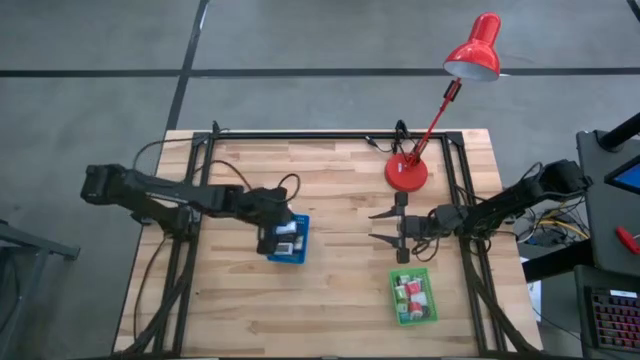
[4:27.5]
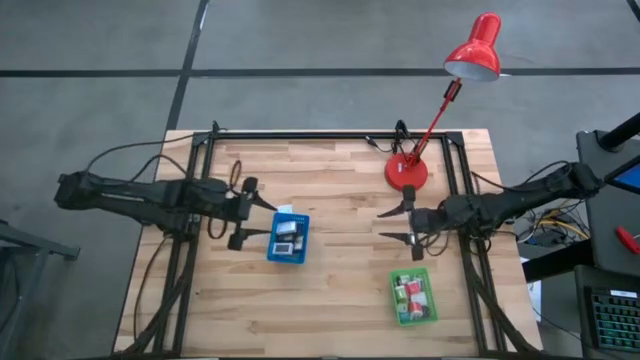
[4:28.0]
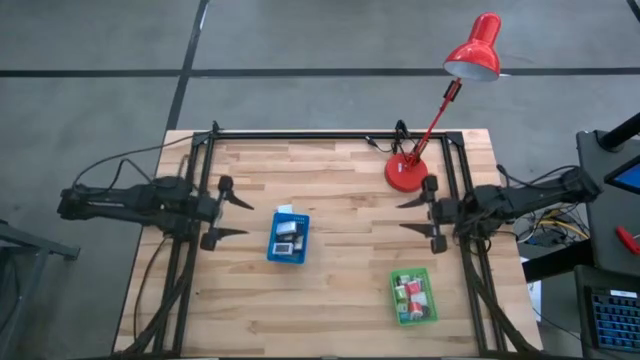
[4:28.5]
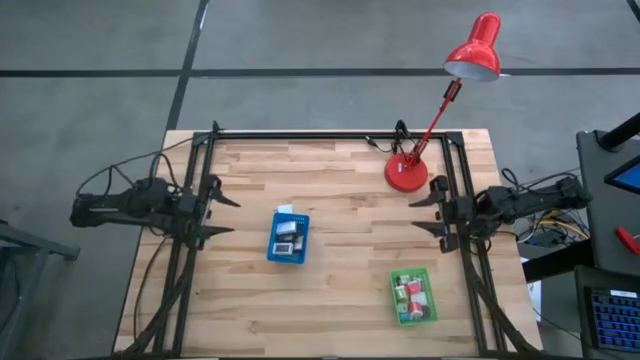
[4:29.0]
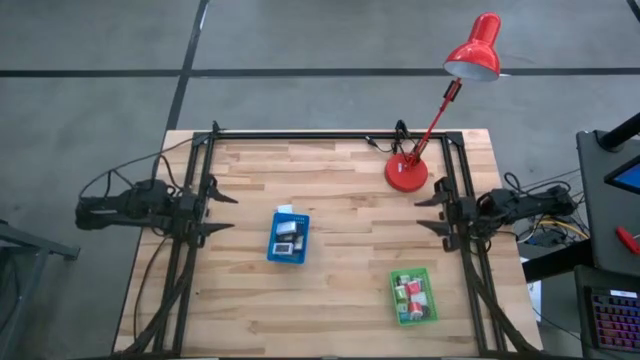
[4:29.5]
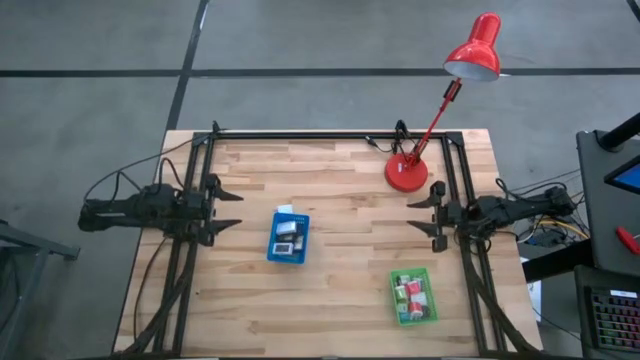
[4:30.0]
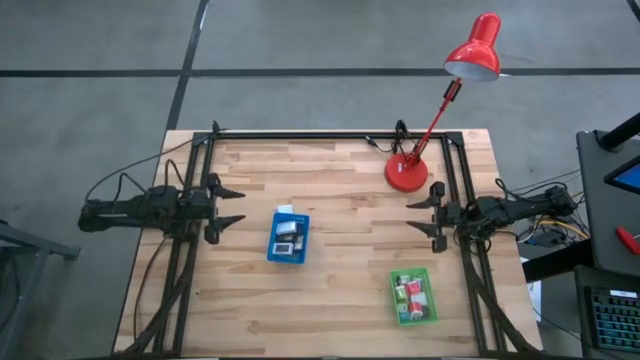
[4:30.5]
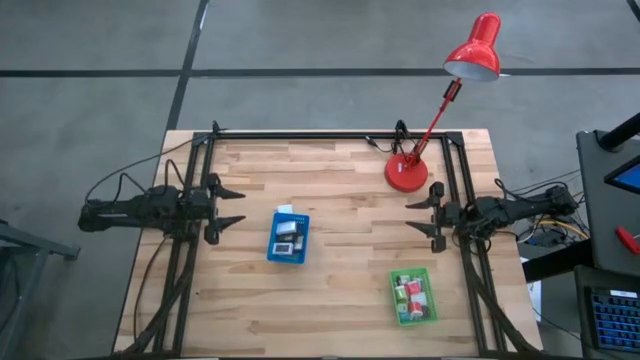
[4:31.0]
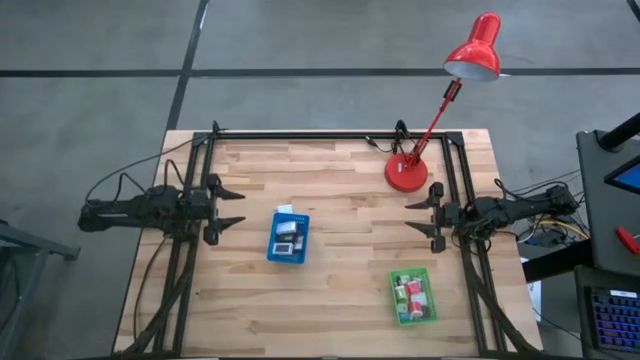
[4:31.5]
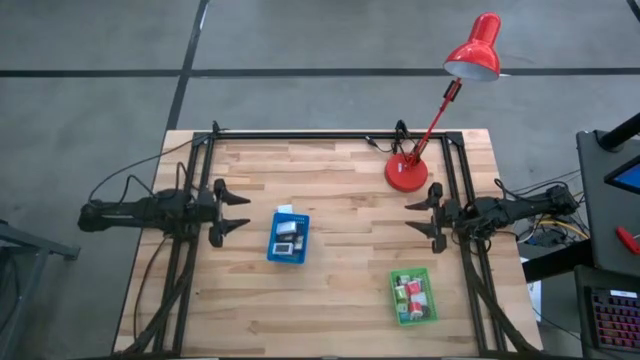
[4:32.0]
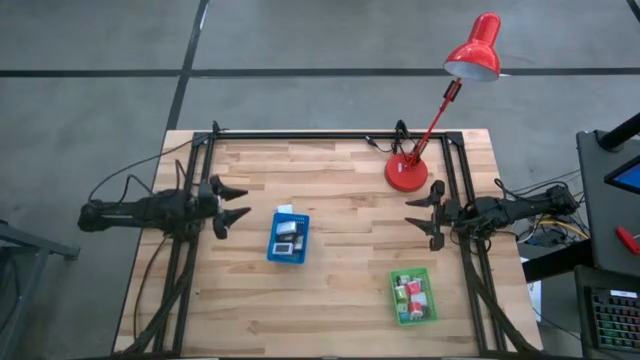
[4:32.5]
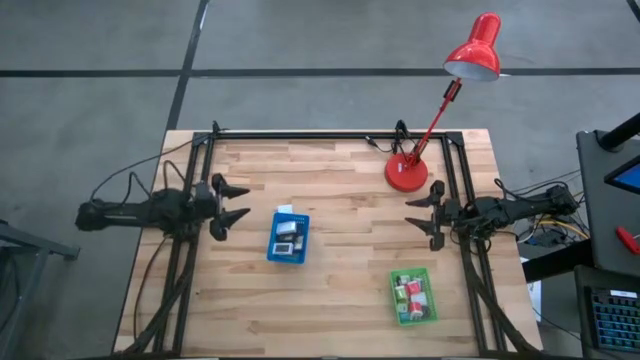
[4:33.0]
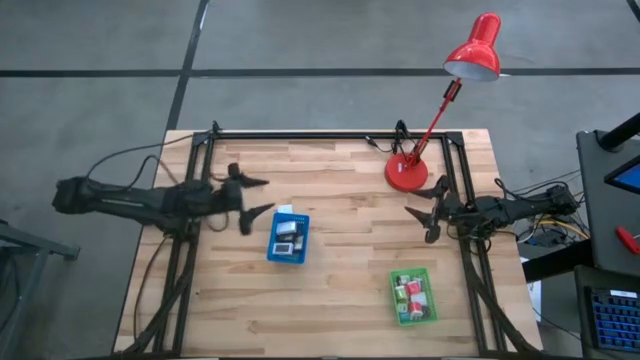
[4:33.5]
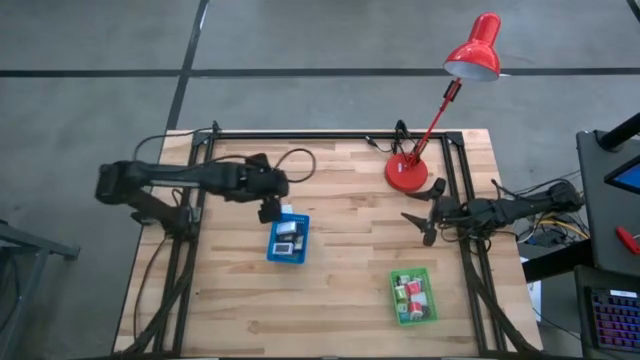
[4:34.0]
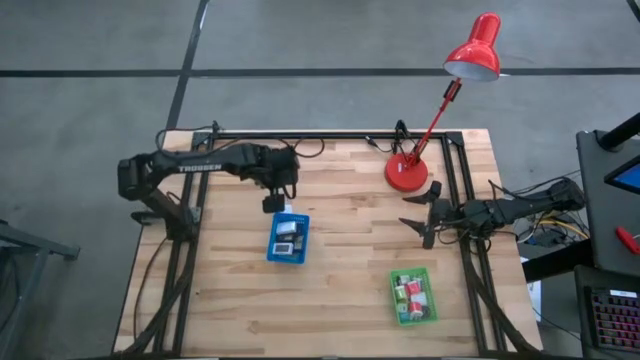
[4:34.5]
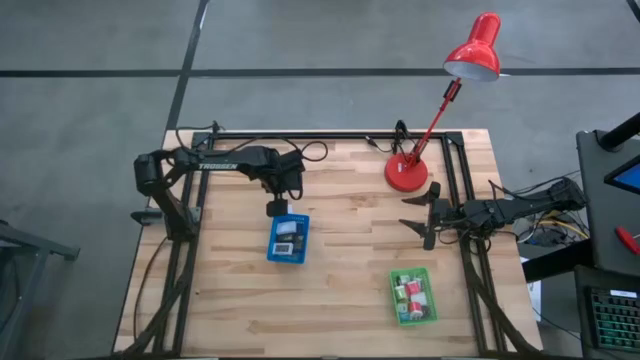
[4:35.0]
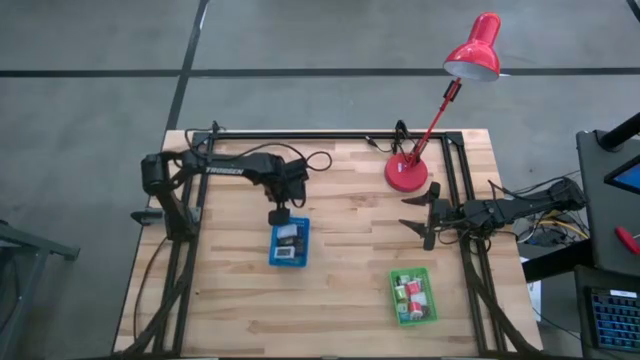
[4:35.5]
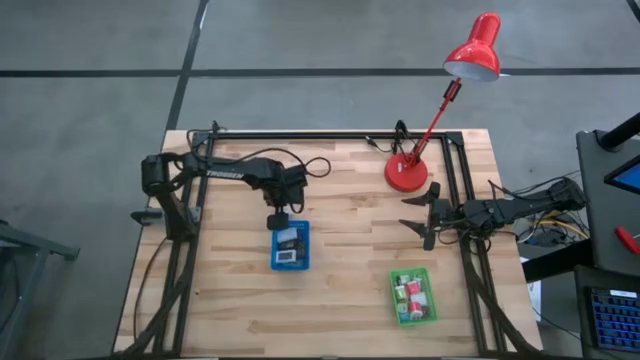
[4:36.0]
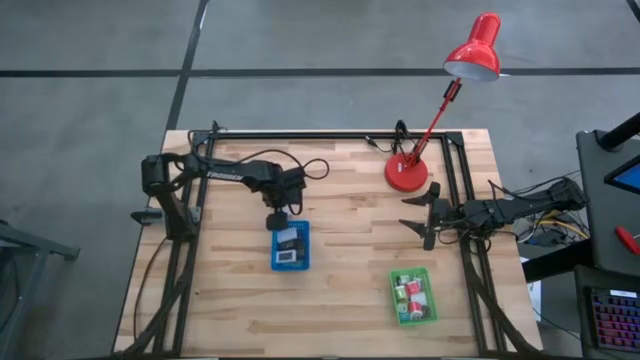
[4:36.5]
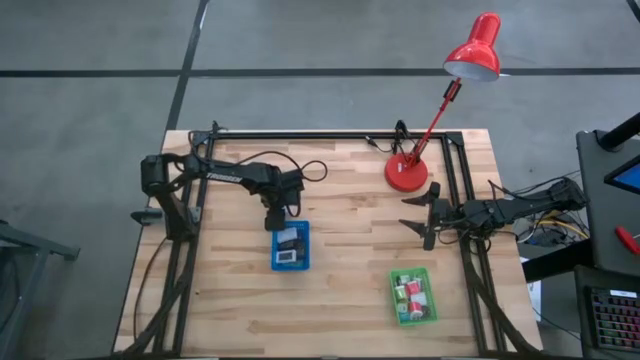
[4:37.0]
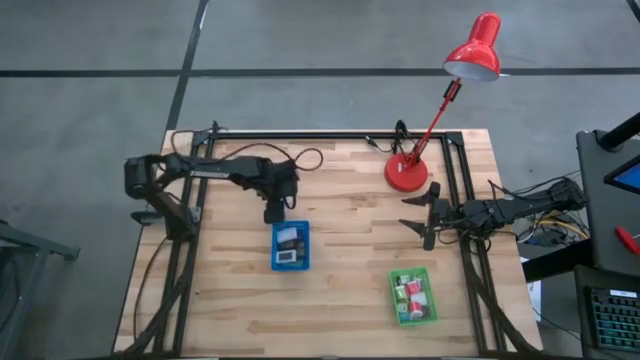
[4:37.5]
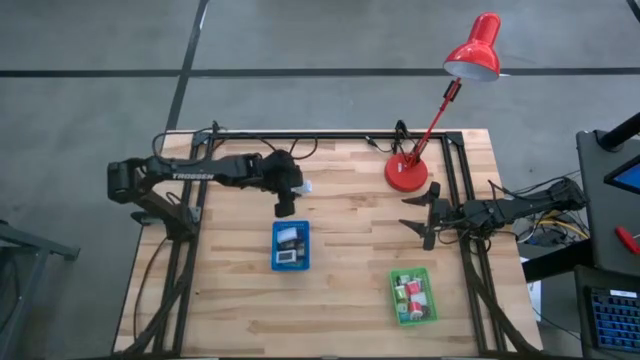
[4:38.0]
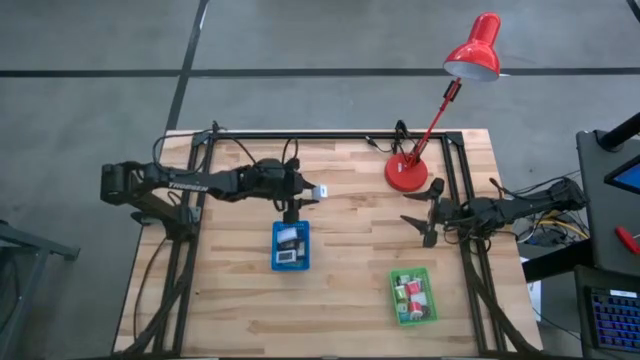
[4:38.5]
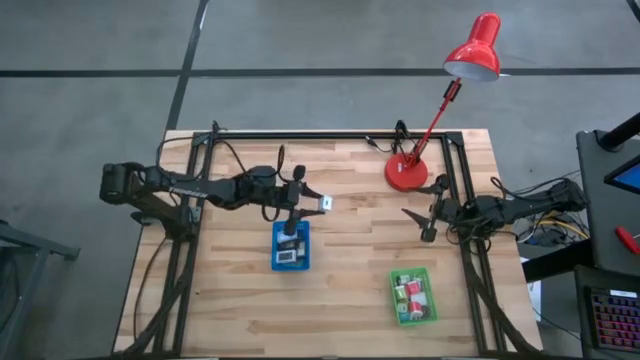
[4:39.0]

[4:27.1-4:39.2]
Task: Pick & Place Office items
Put the white charger adapter into the green bin

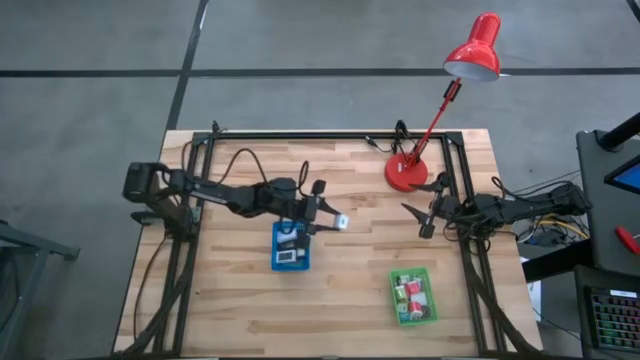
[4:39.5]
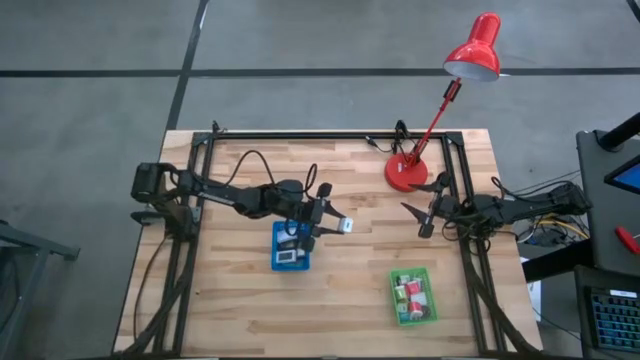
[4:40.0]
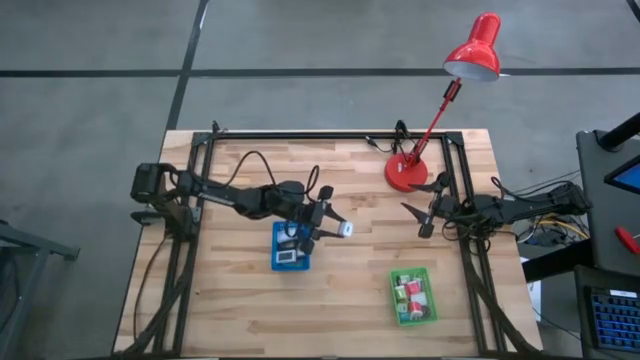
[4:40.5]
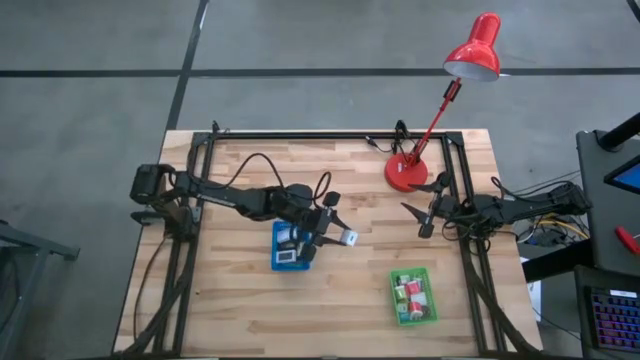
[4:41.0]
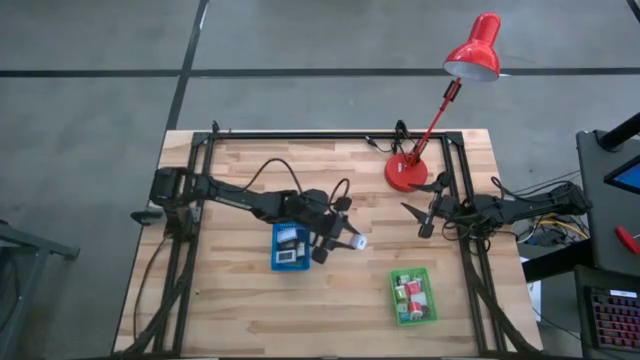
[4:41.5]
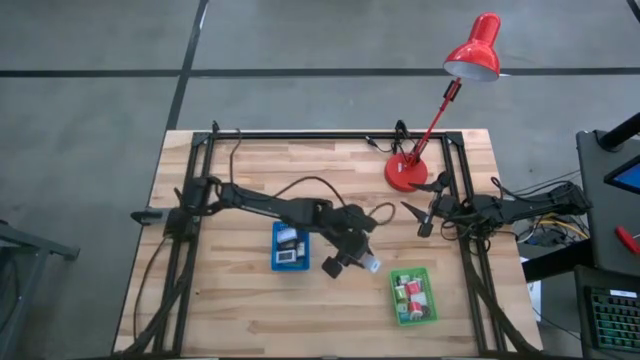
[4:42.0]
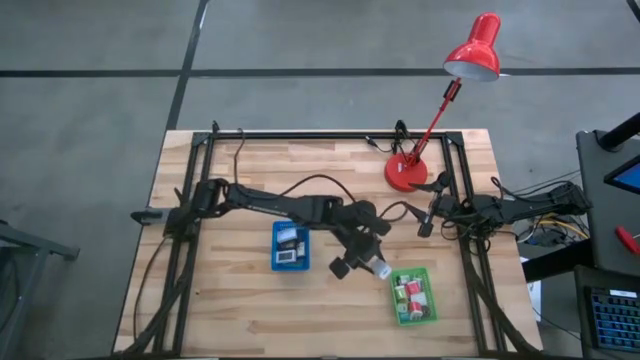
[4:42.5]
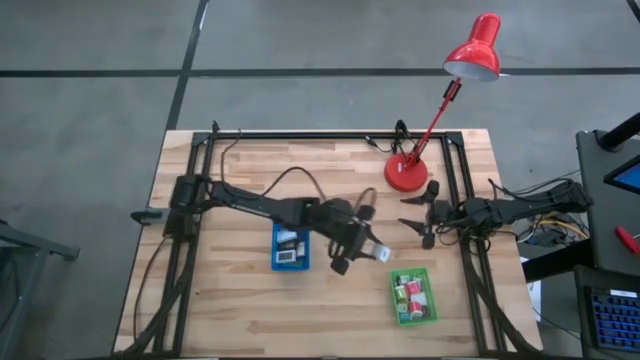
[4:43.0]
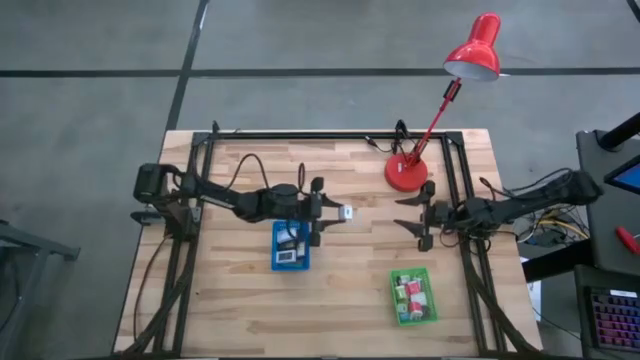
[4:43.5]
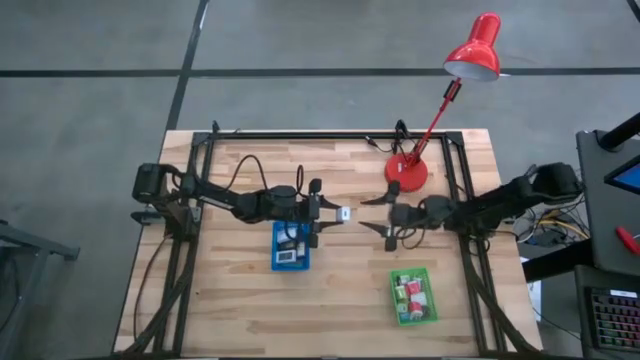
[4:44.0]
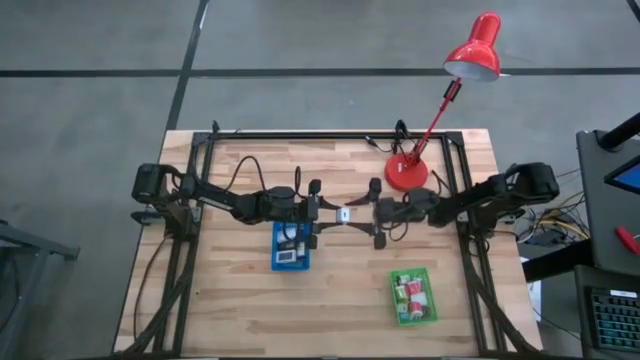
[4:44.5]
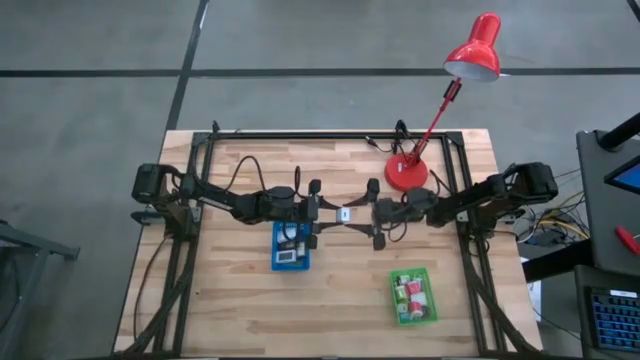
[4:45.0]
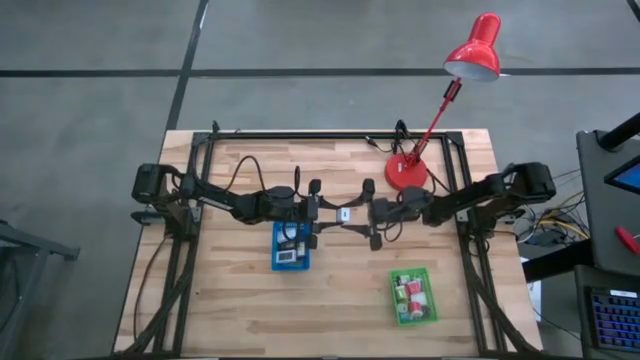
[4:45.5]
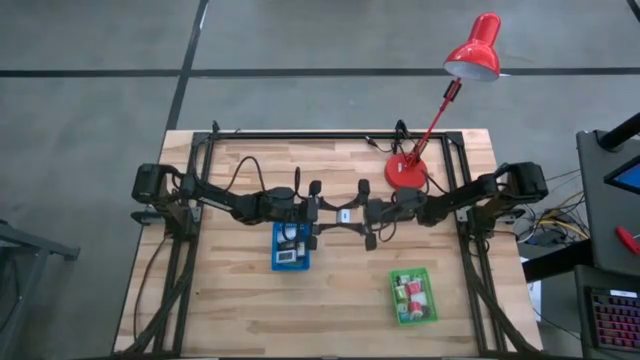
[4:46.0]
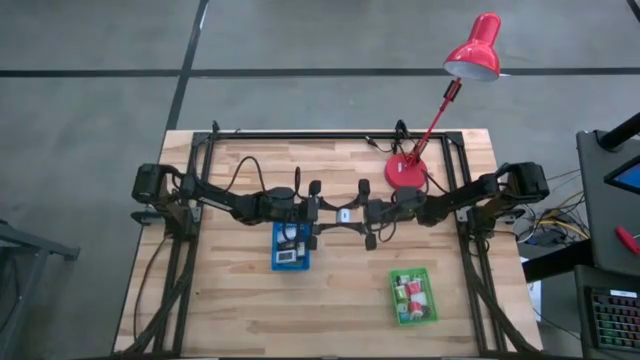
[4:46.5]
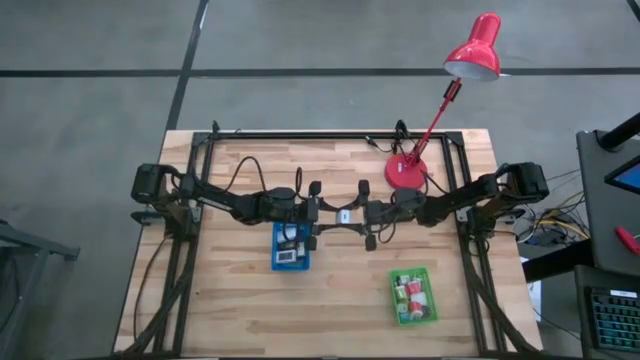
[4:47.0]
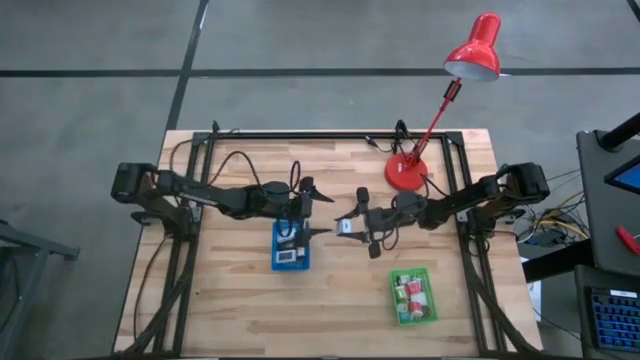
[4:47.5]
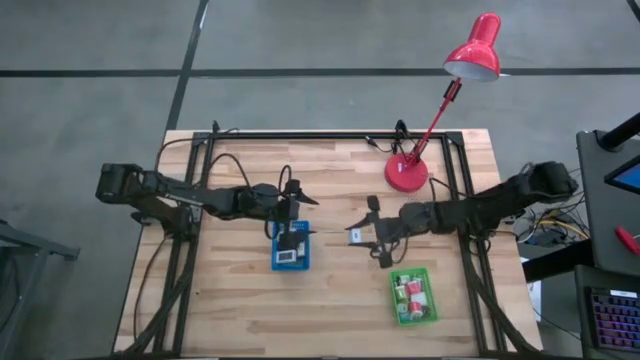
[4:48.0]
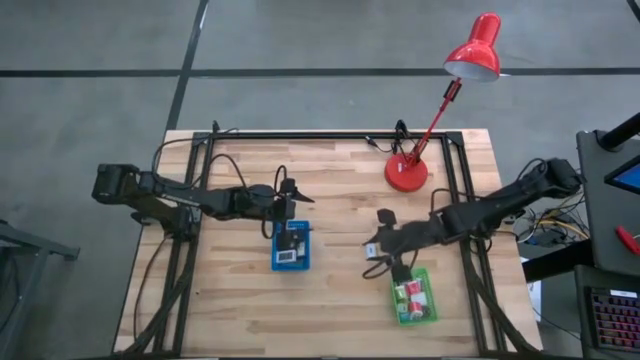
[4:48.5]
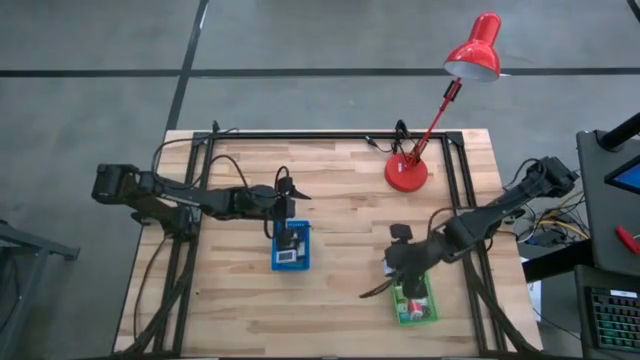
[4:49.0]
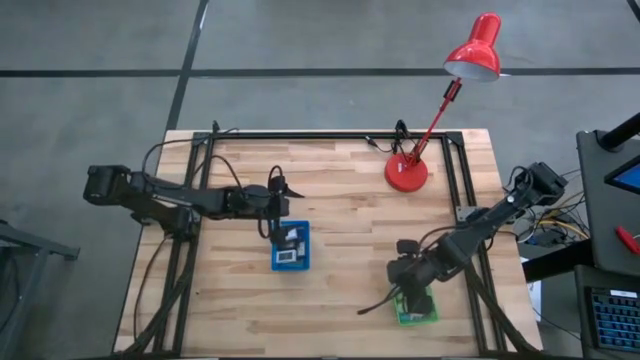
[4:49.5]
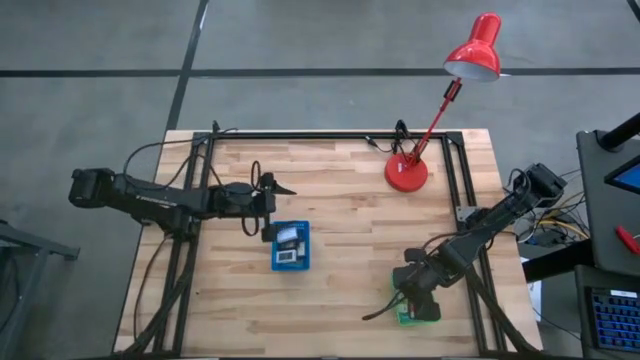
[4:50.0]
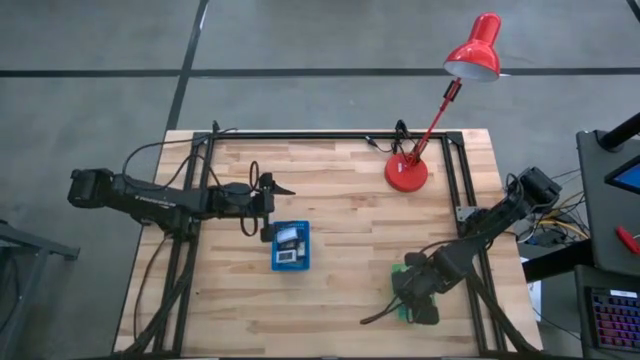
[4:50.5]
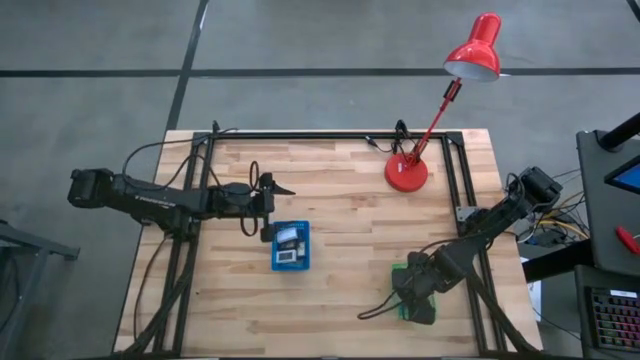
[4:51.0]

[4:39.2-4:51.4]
Put the white charger adapter into the green bin
